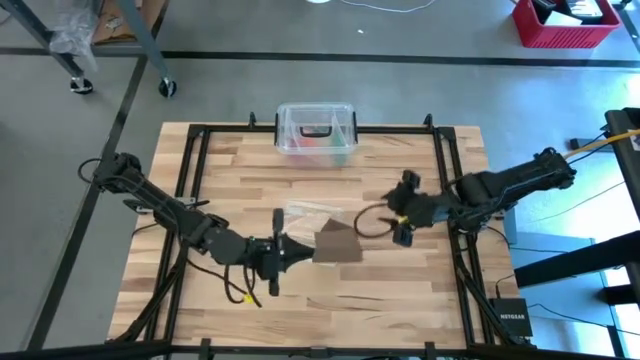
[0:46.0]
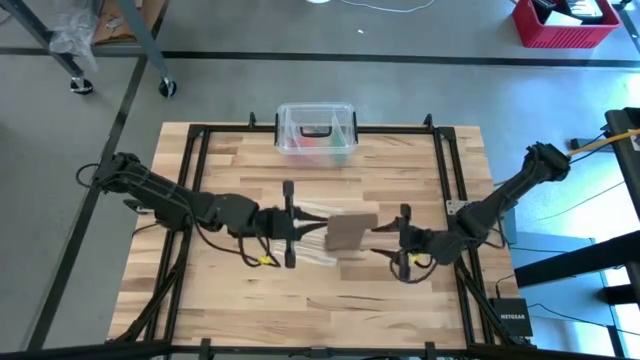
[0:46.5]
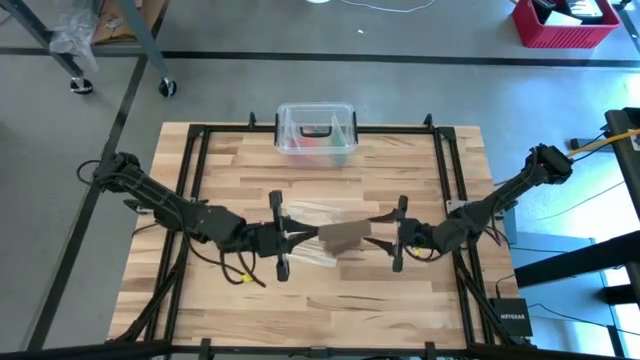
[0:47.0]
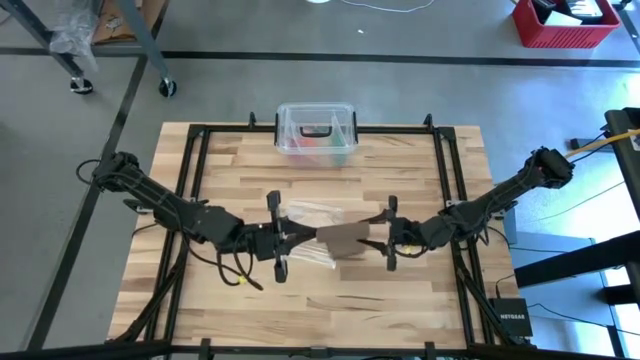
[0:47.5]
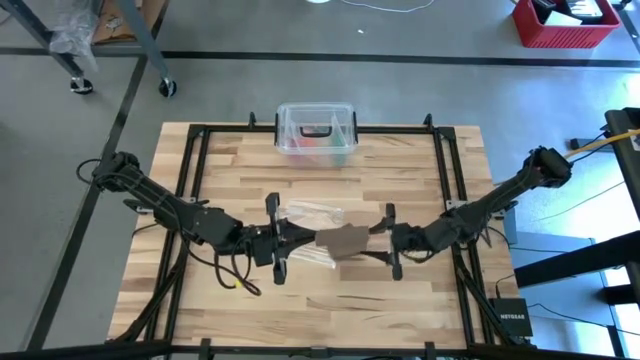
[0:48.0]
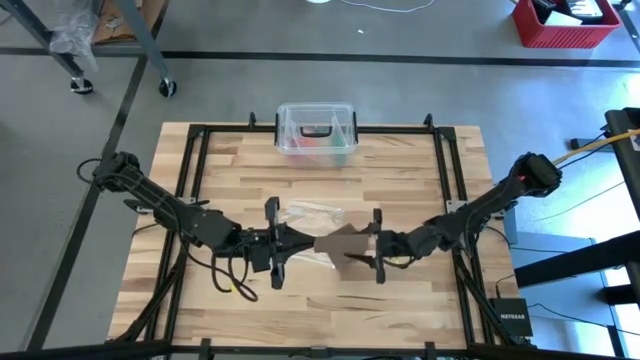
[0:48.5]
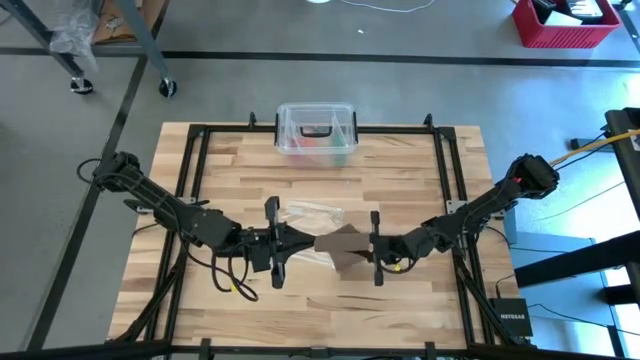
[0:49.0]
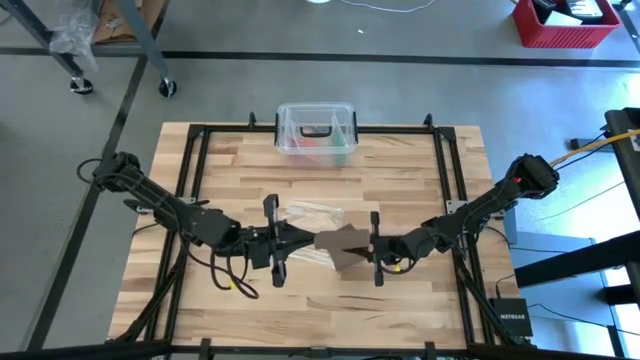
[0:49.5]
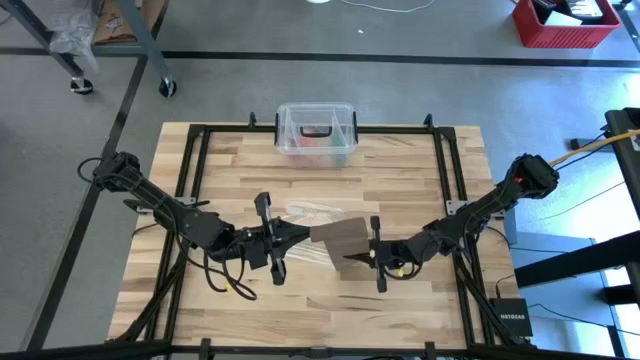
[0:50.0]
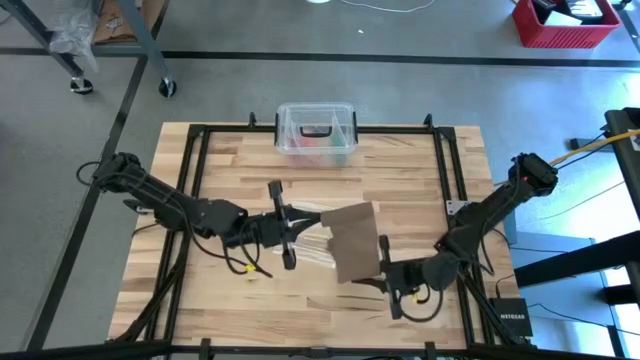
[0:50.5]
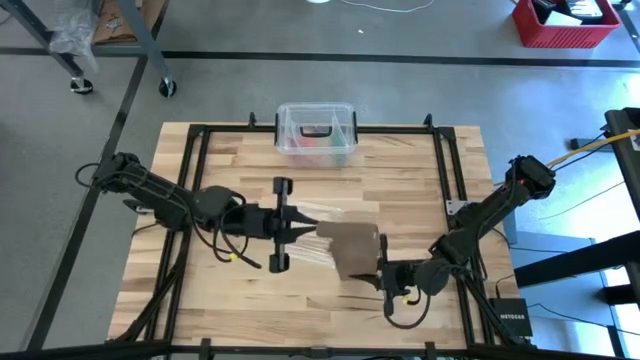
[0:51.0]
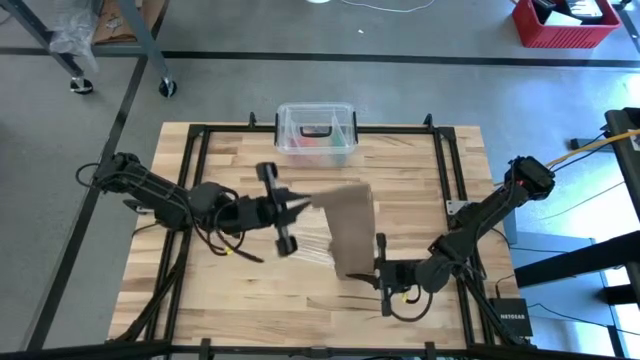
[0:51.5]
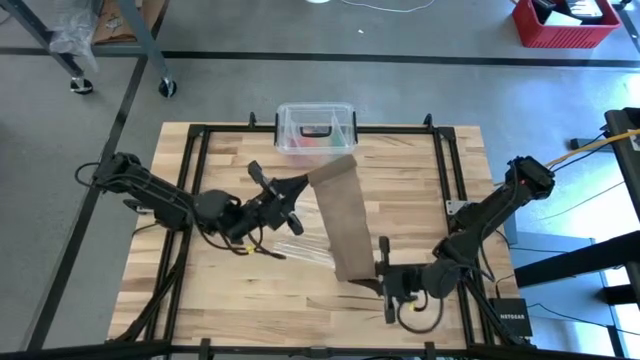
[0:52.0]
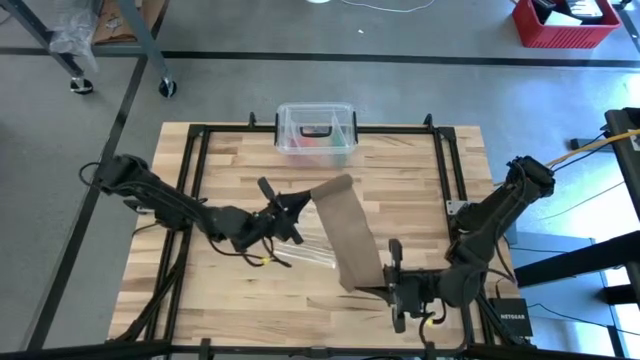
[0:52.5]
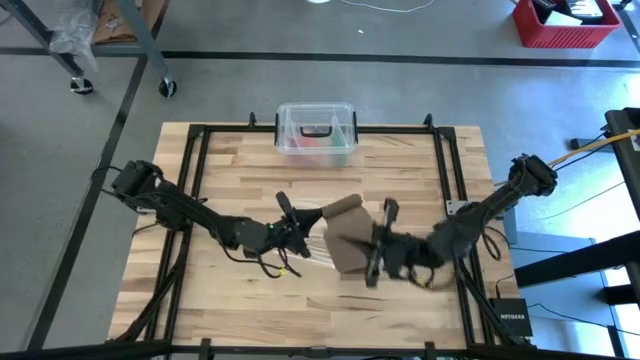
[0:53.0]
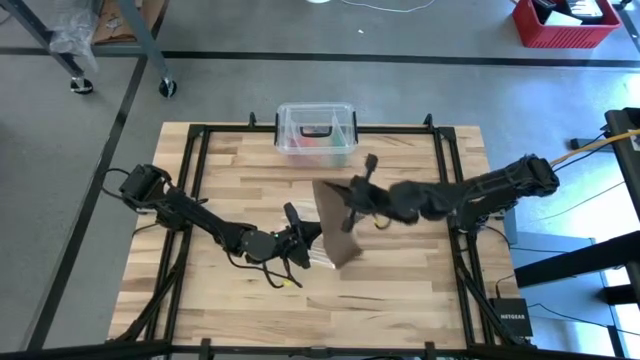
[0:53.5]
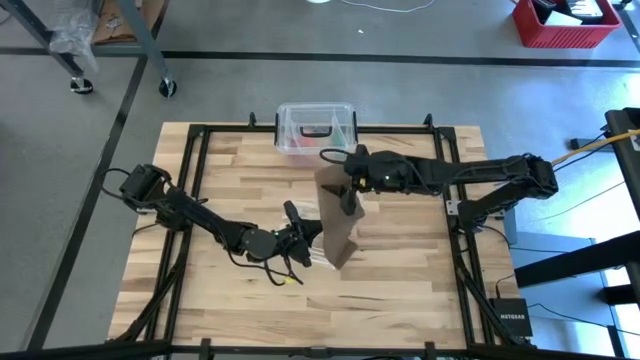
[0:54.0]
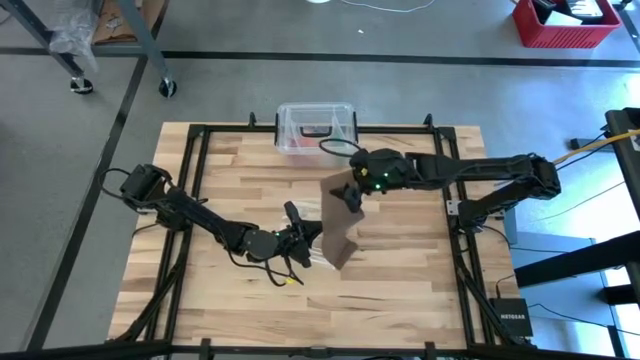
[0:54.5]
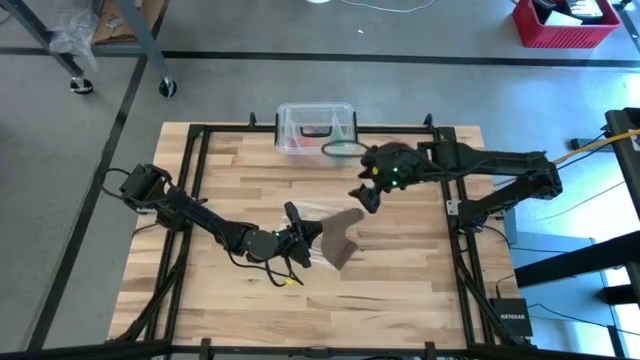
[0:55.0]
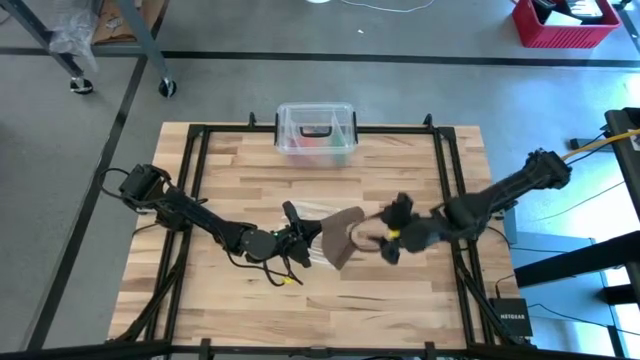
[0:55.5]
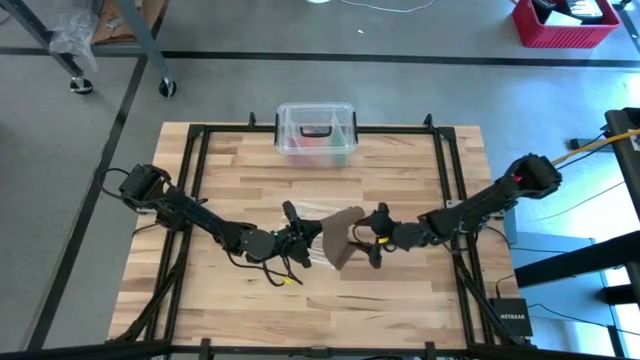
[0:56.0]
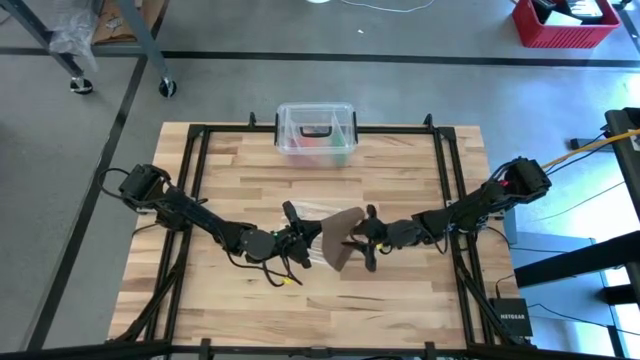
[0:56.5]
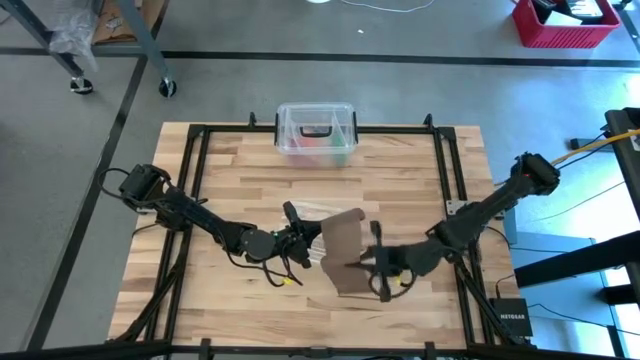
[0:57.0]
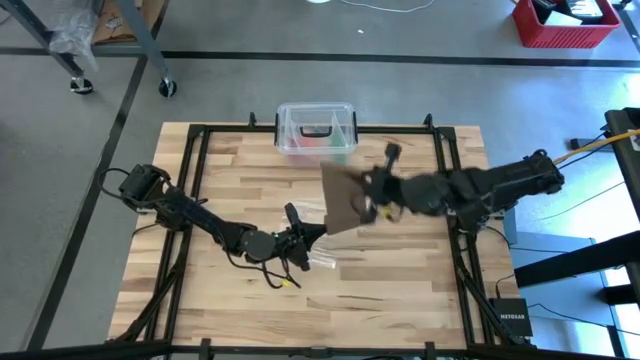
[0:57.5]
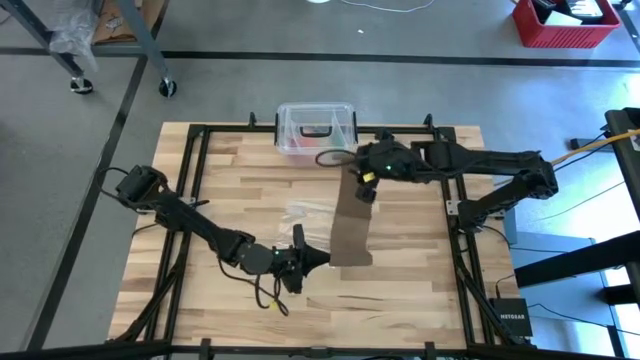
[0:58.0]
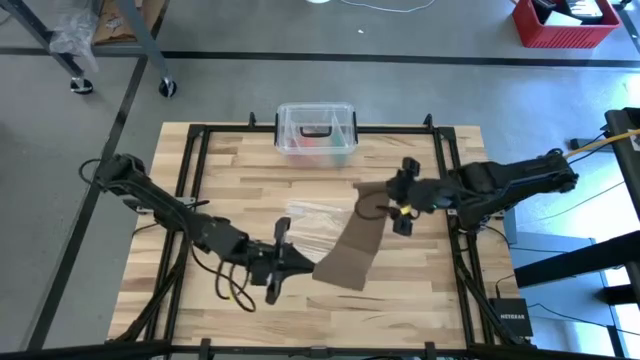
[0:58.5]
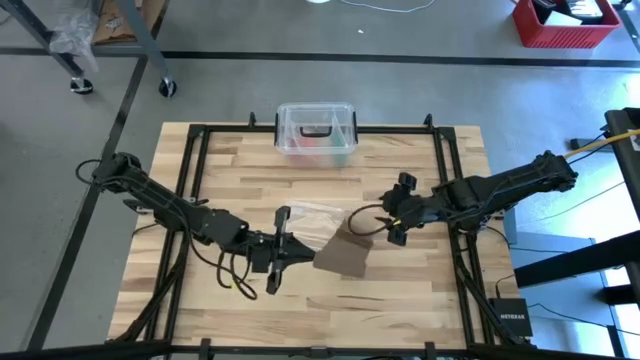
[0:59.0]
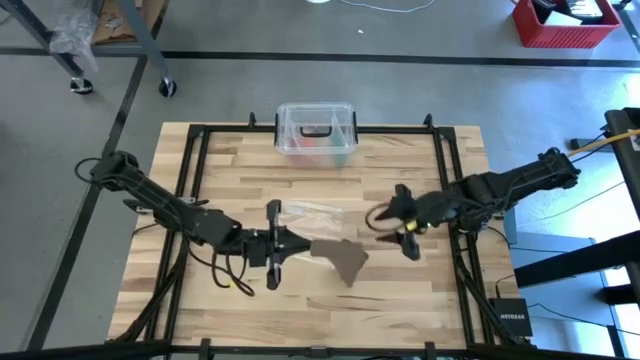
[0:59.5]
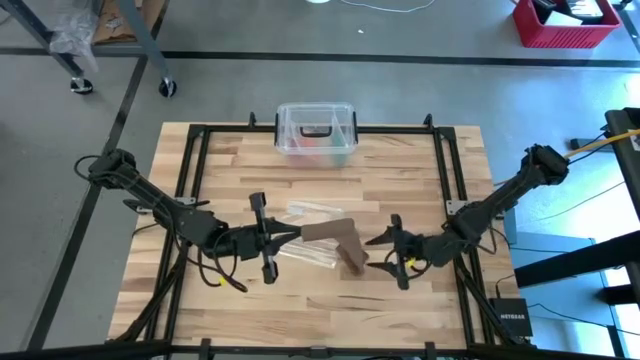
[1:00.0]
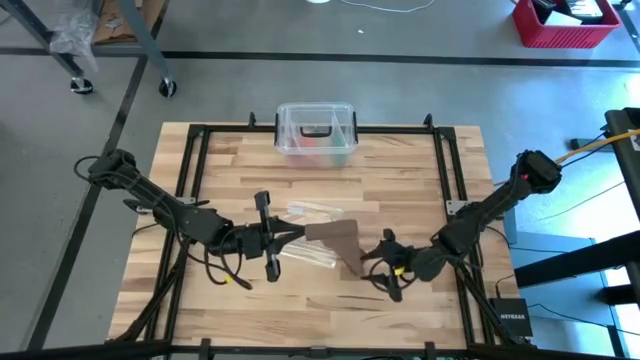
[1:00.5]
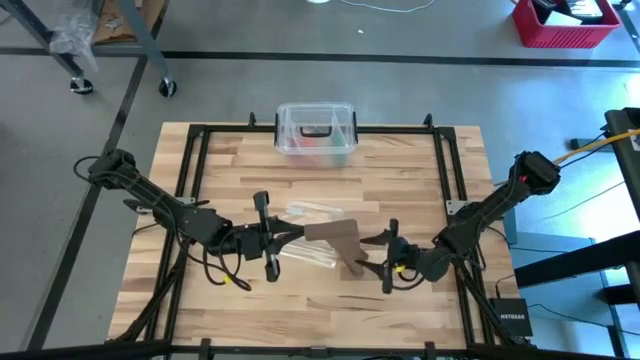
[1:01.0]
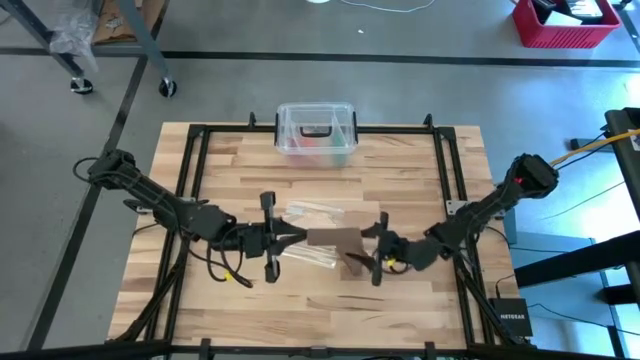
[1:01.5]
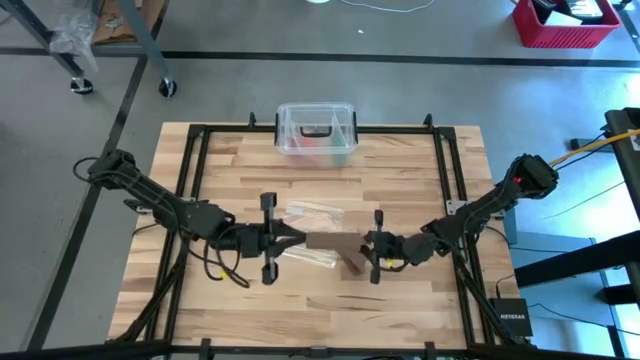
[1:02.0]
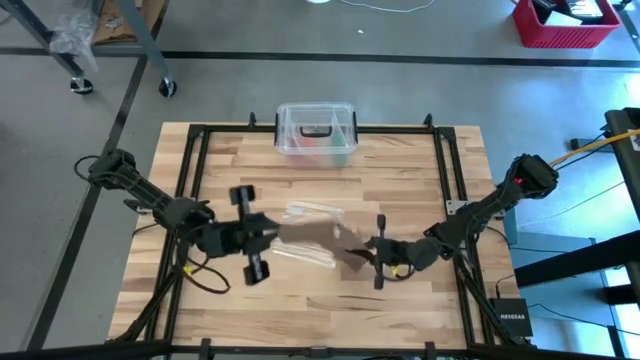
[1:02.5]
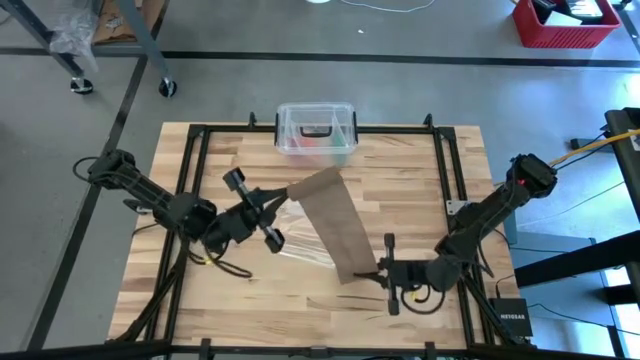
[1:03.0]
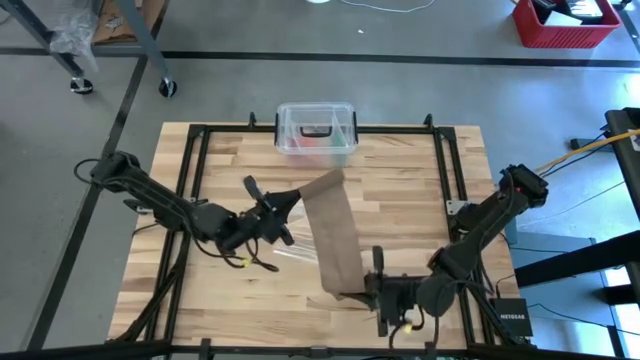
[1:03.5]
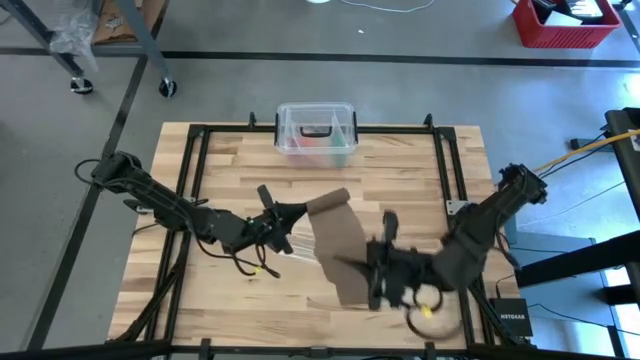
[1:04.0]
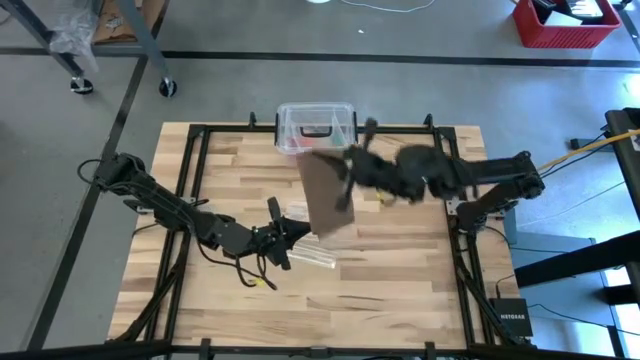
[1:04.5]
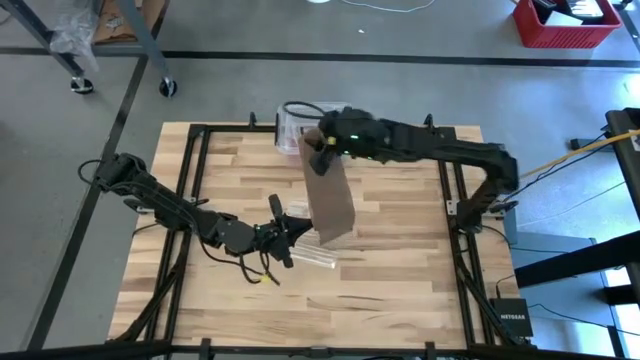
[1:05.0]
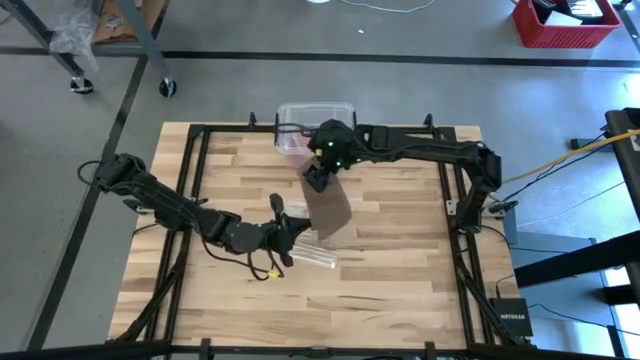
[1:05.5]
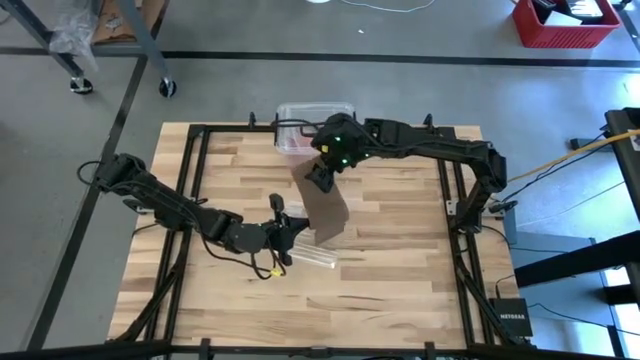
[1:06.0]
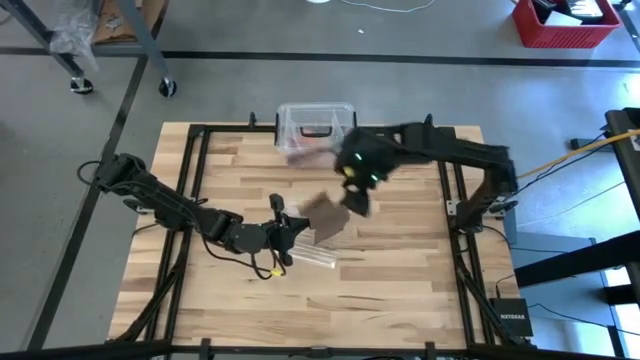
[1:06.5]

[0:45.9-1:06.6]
Task: Roll bandage
Roll the brown bandage
